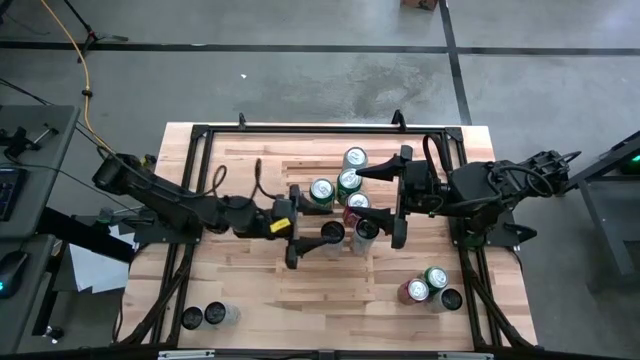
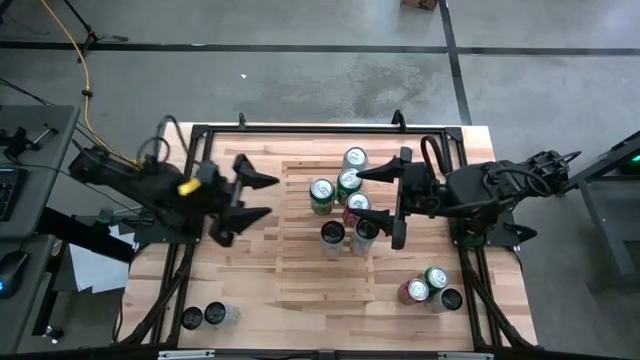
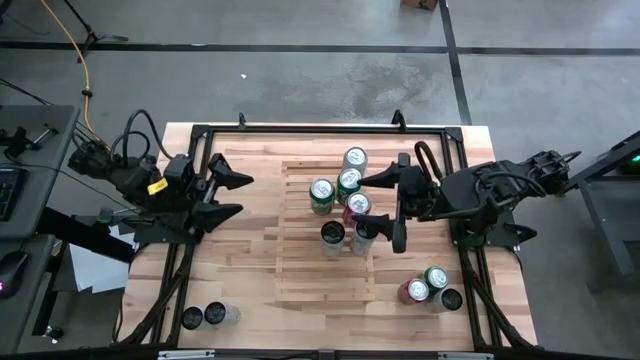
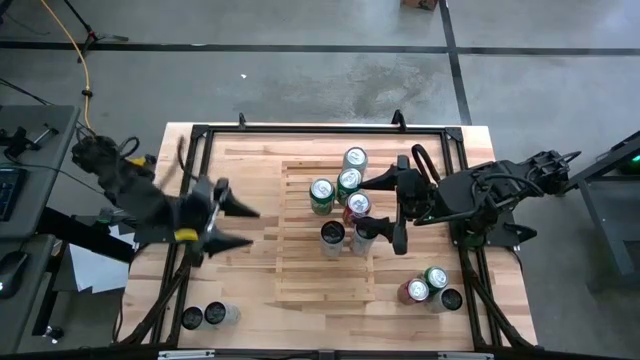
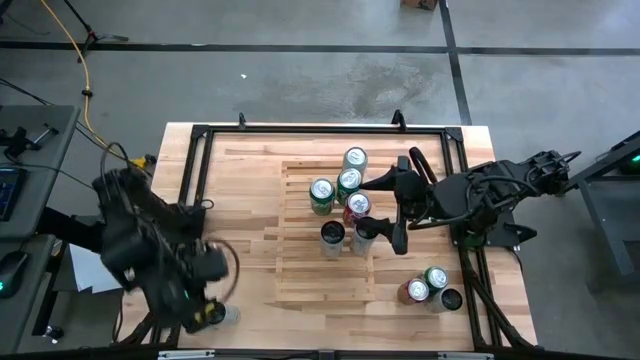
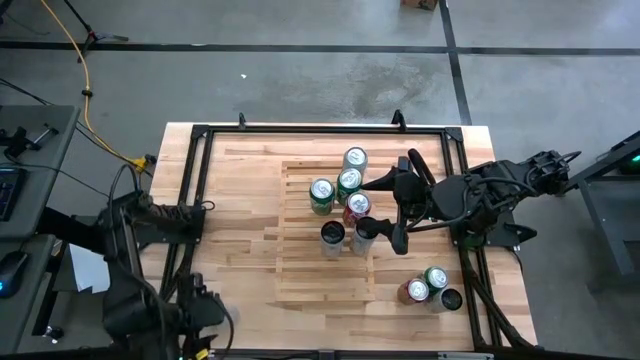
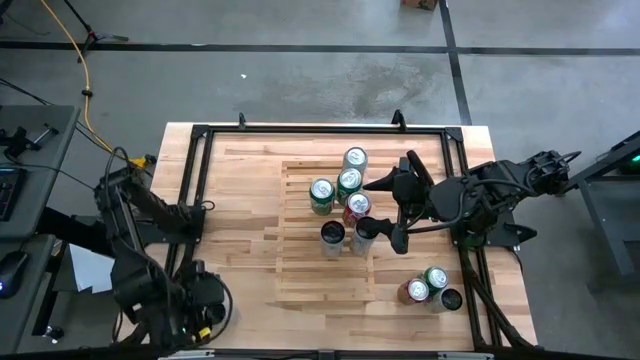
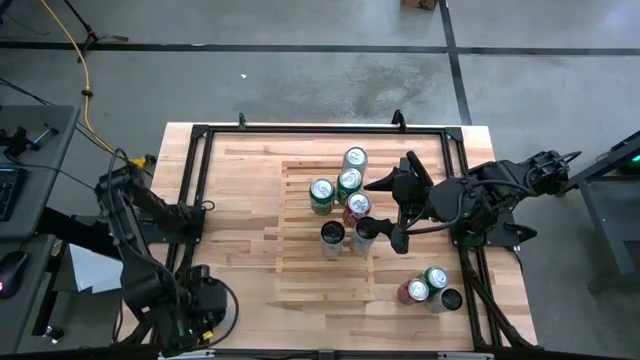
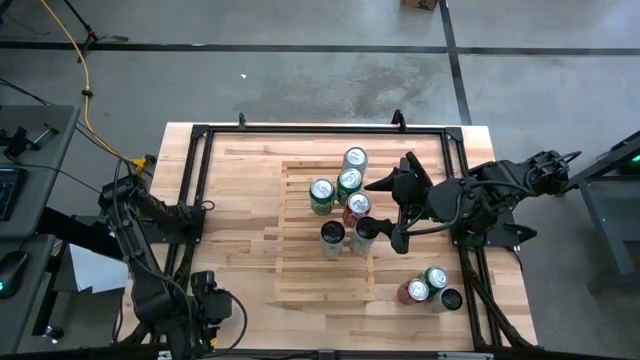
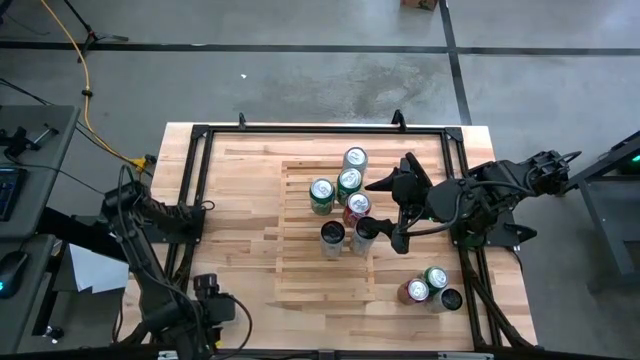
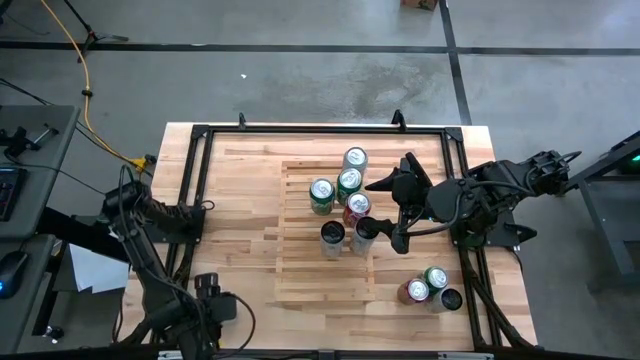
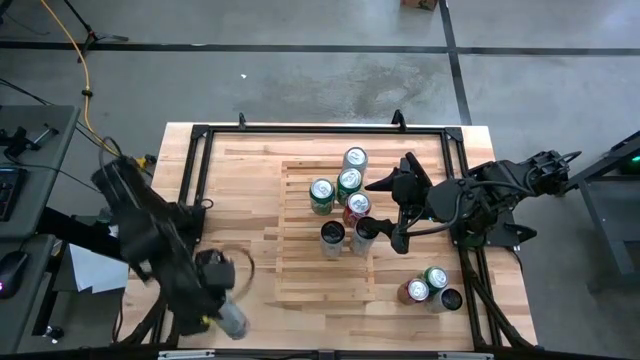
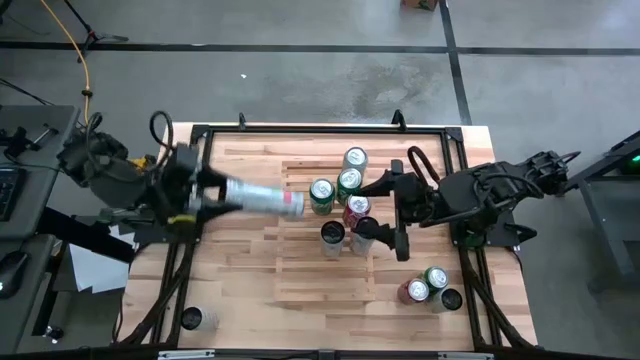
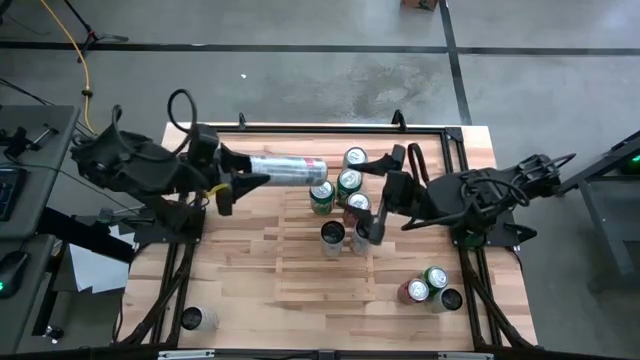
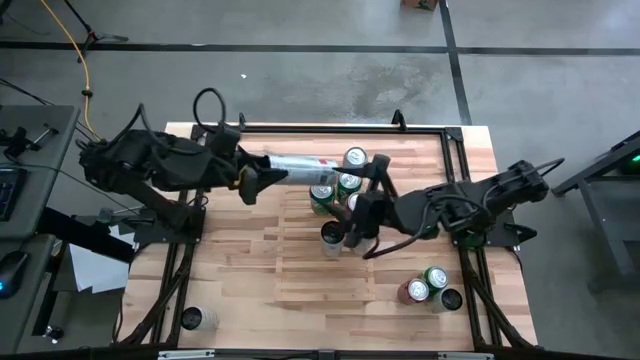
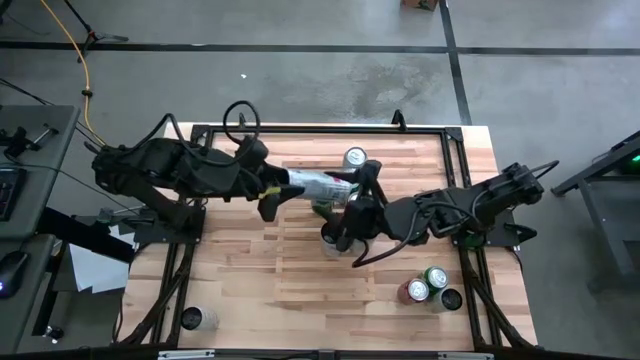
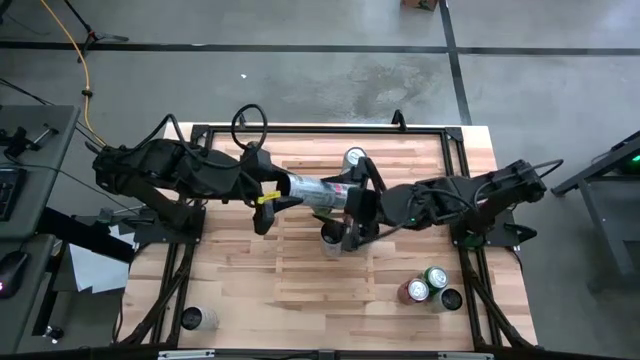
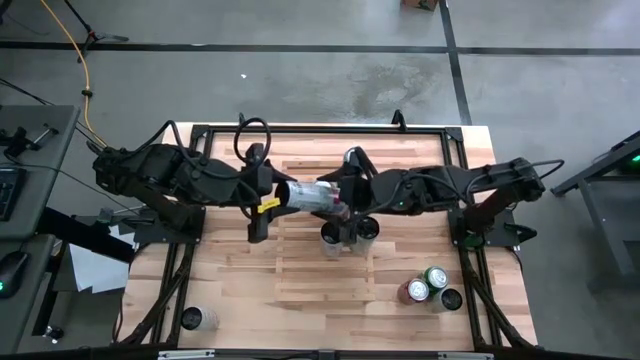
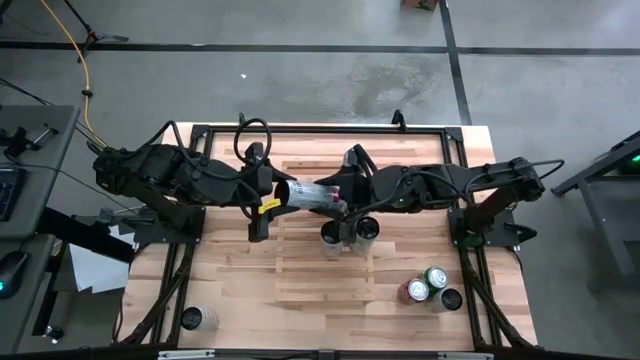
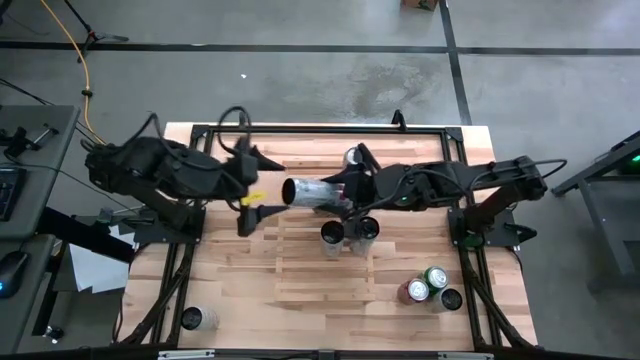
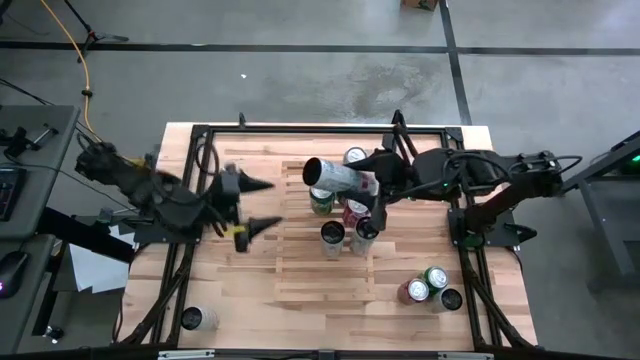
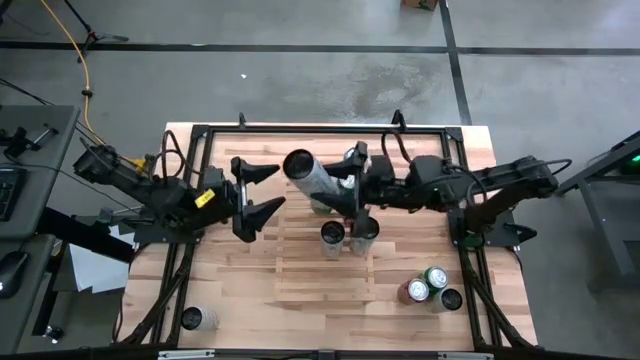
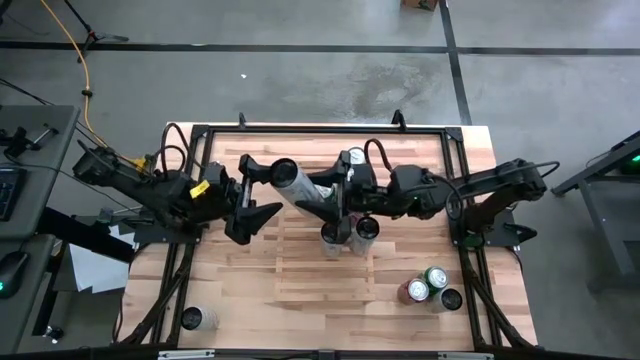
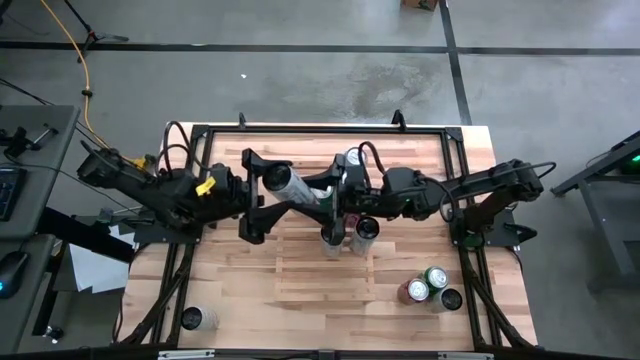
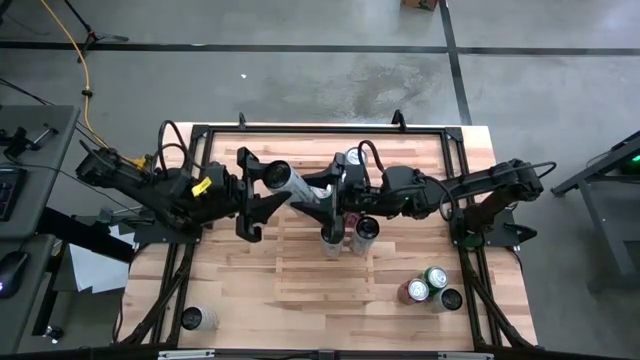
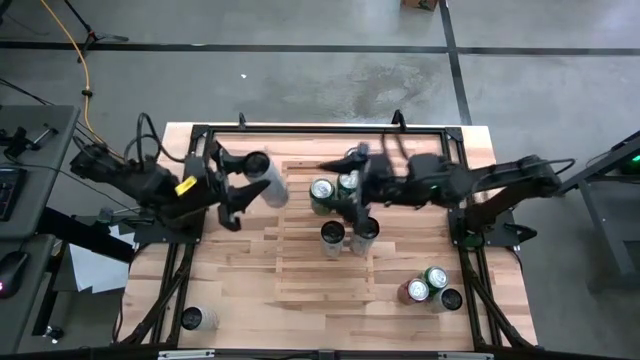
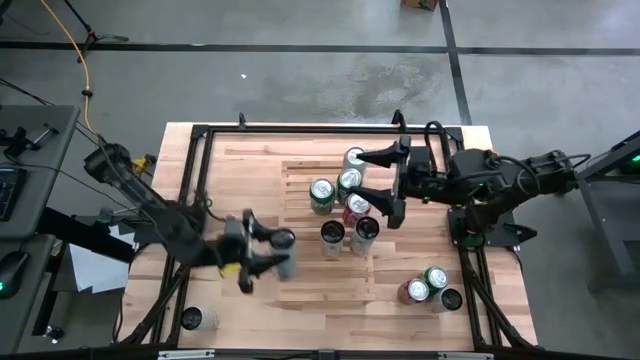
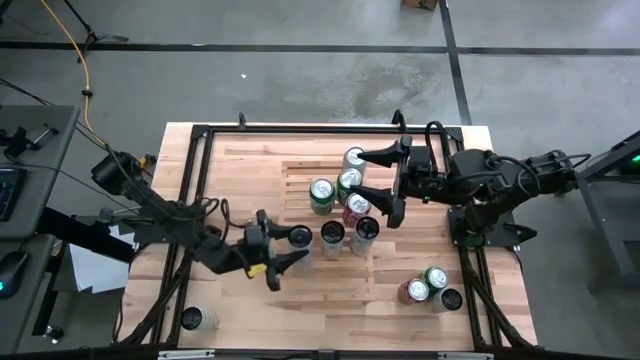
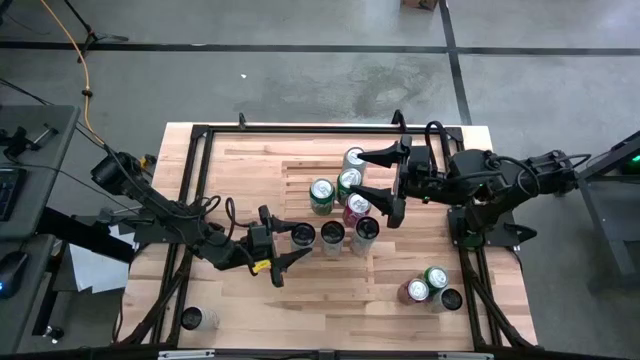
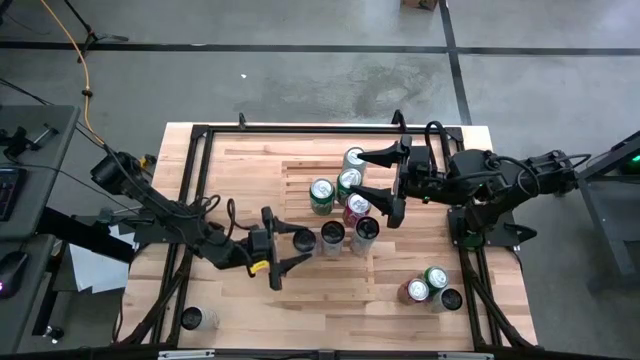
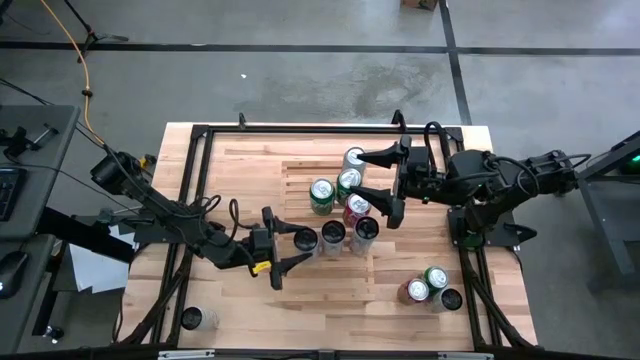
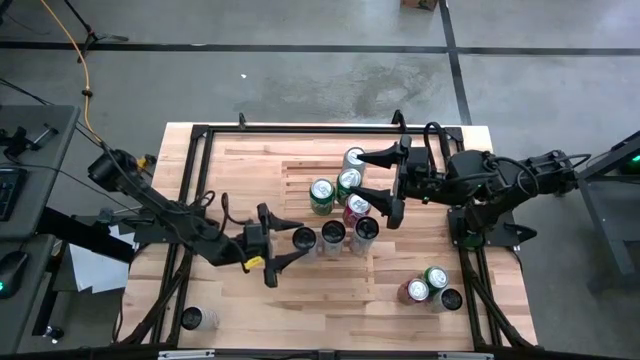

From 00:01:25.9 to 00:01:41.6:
Task: Place canned beverage on shelf
Put the white pink soda can on the shelf aligned with the other white pink soda cans

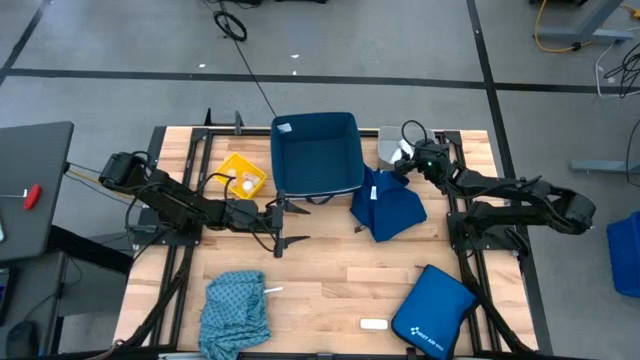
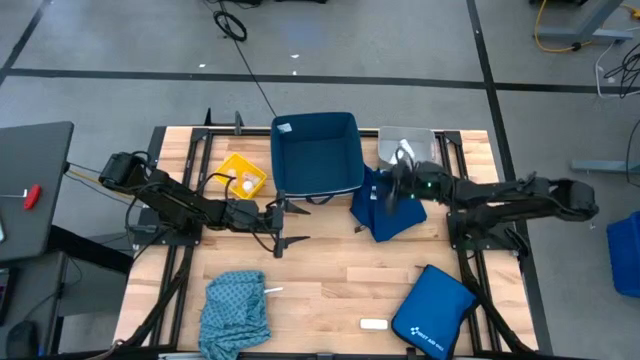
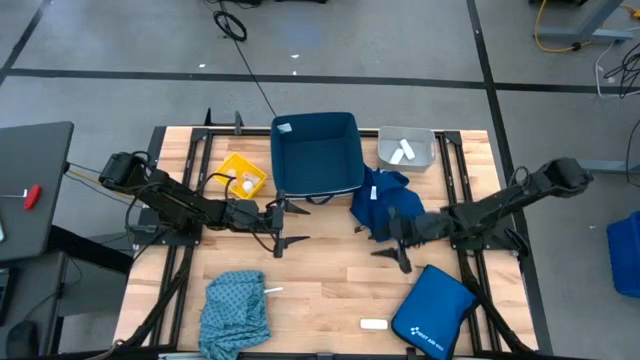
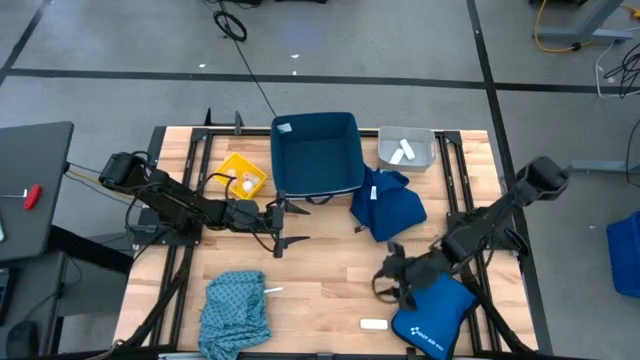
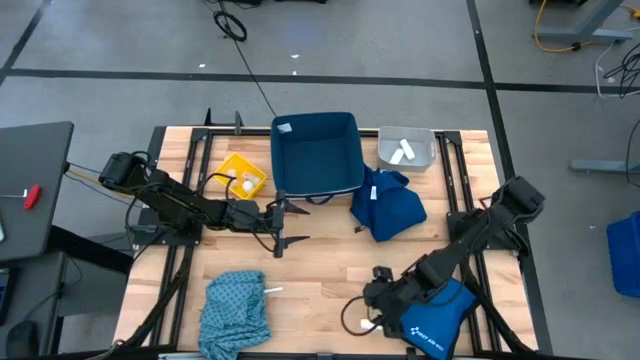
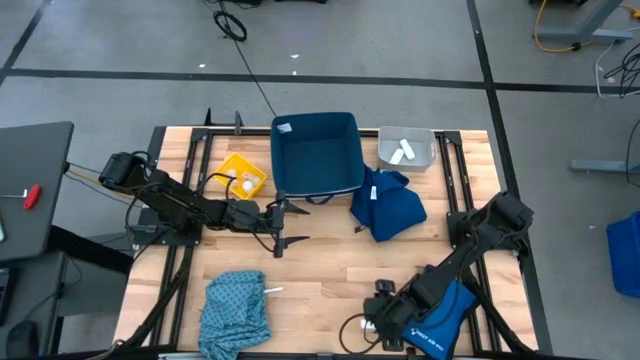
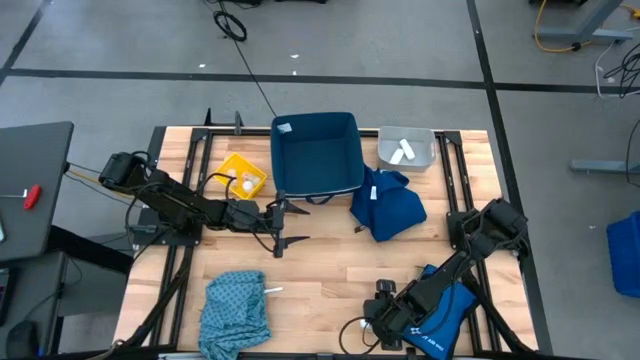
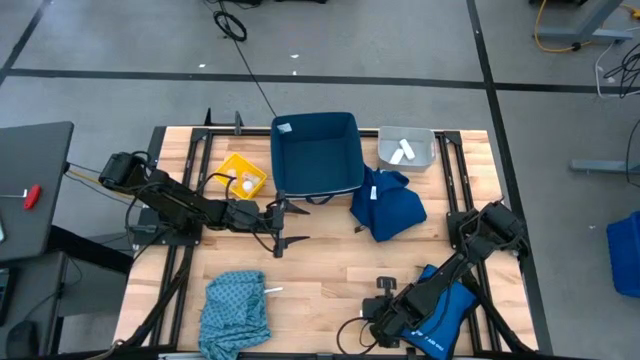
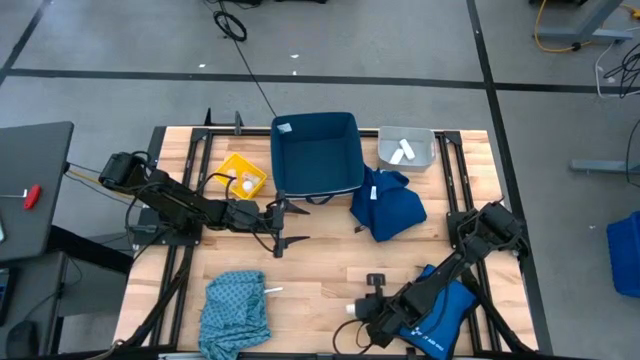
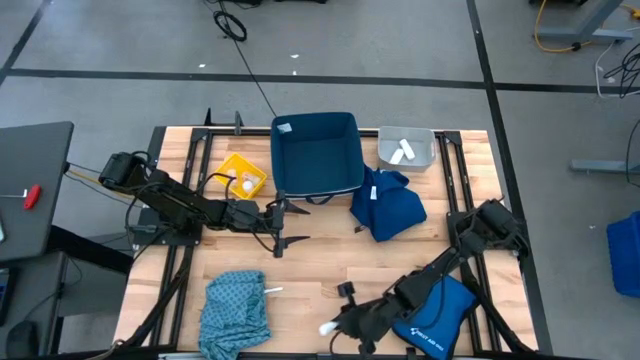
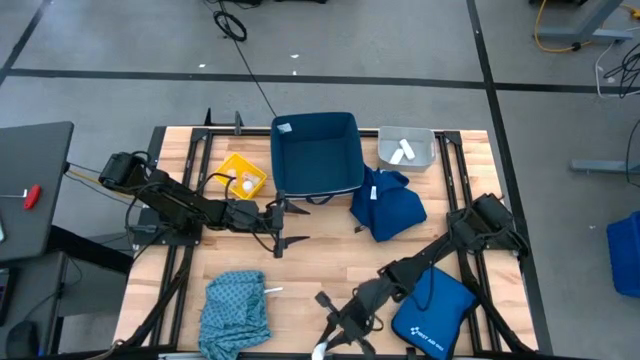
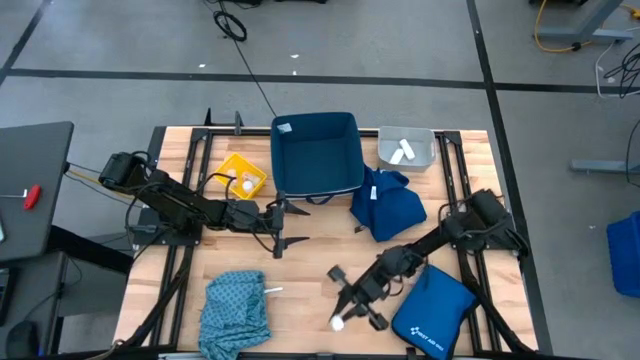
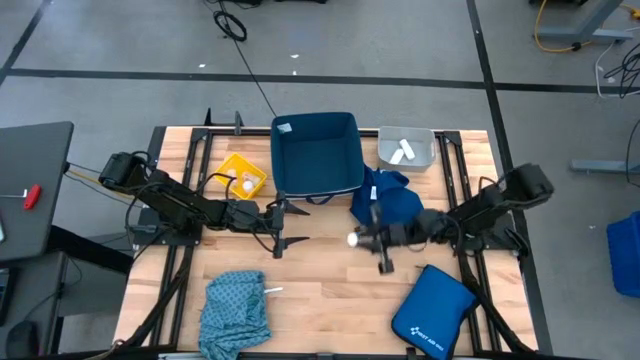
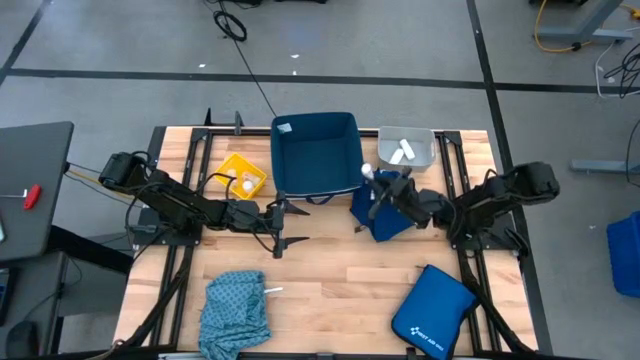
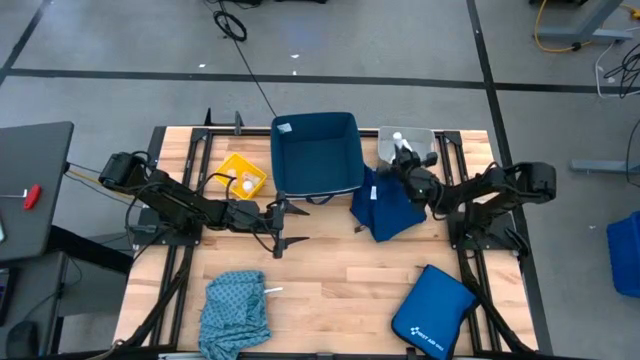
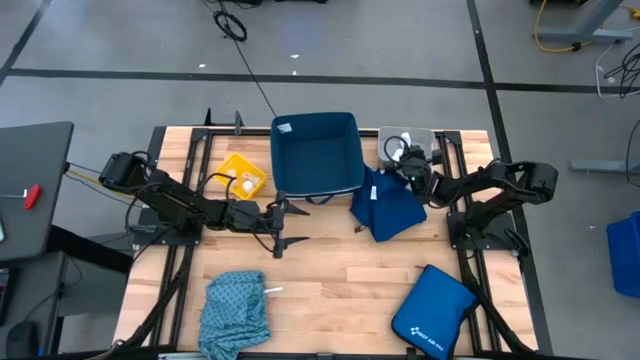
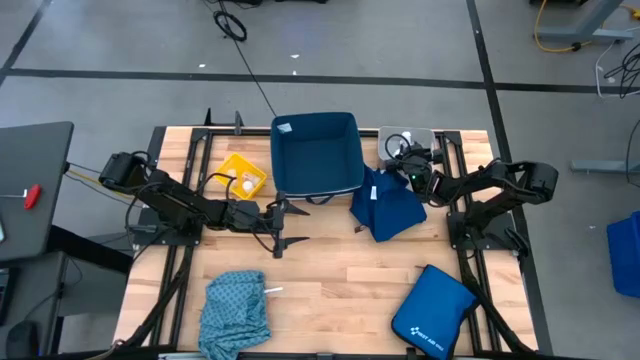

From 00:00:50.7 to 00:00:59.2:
Task: Pick & place medical supplies in basket/bin
Put the white bandage into the grey bin
